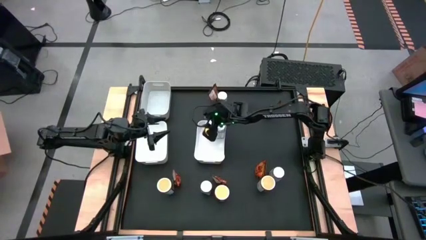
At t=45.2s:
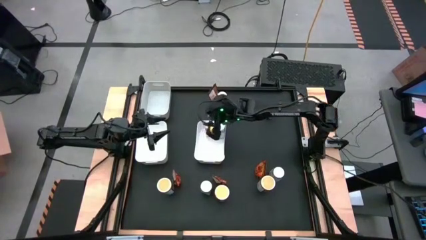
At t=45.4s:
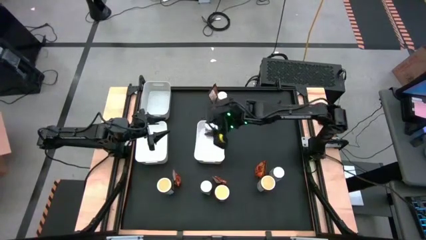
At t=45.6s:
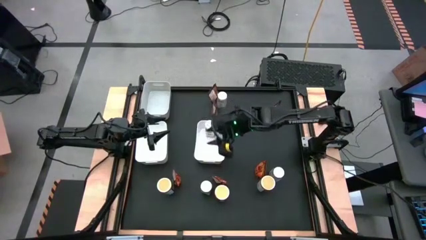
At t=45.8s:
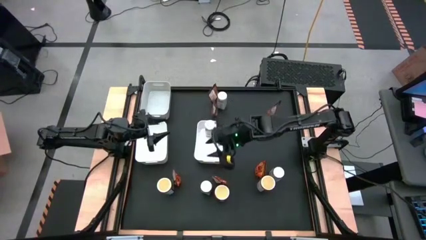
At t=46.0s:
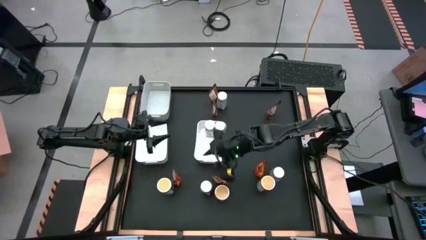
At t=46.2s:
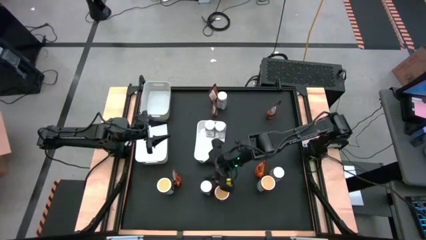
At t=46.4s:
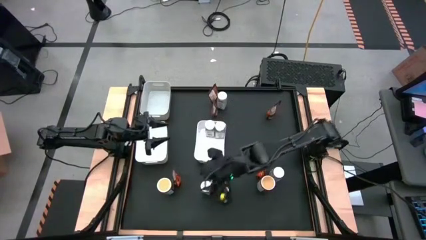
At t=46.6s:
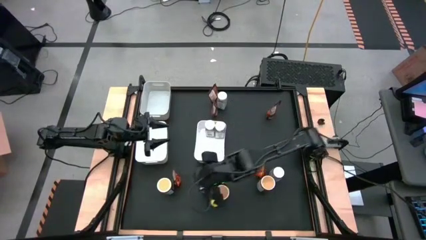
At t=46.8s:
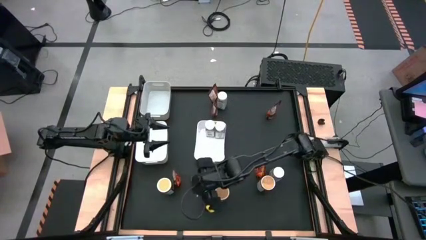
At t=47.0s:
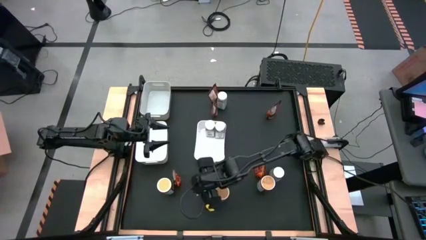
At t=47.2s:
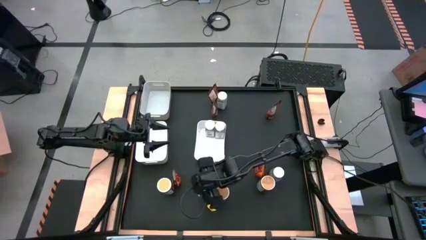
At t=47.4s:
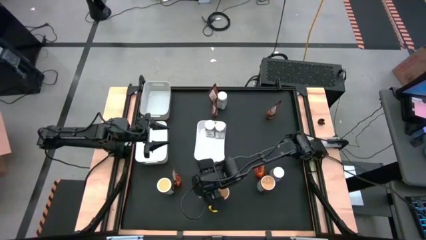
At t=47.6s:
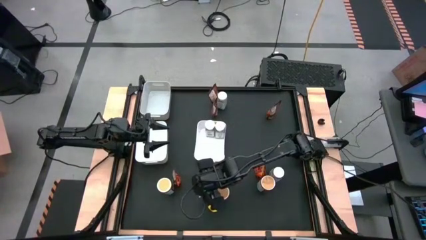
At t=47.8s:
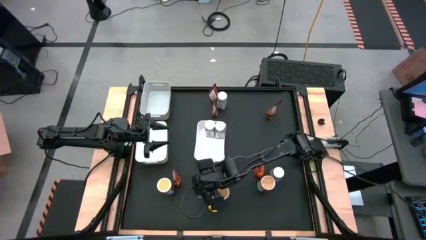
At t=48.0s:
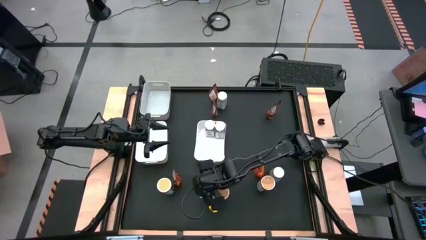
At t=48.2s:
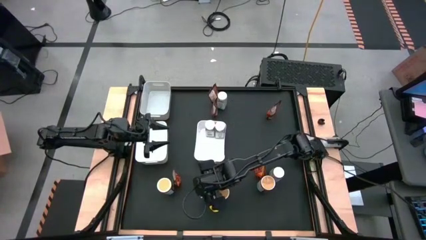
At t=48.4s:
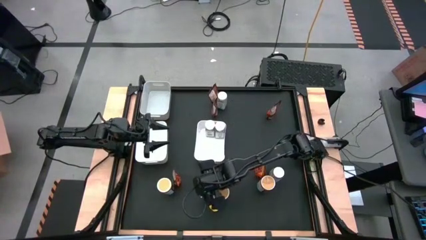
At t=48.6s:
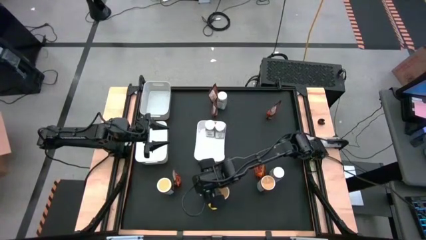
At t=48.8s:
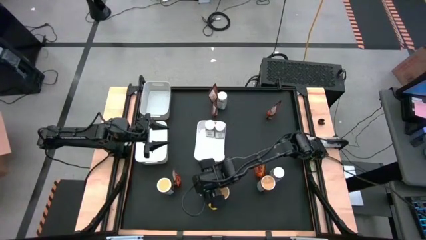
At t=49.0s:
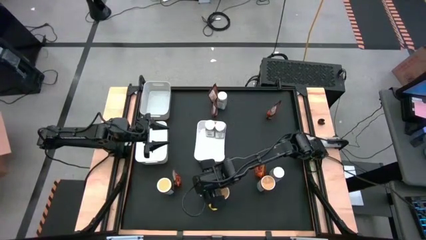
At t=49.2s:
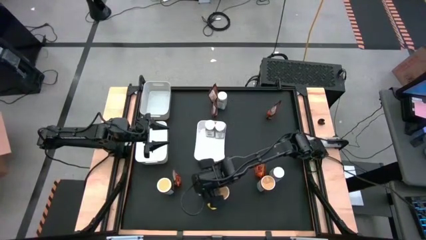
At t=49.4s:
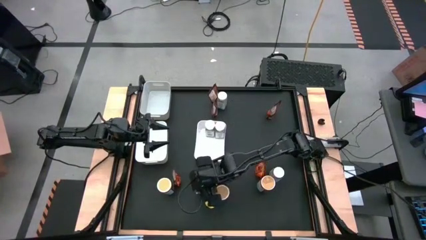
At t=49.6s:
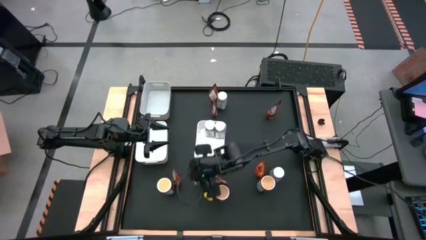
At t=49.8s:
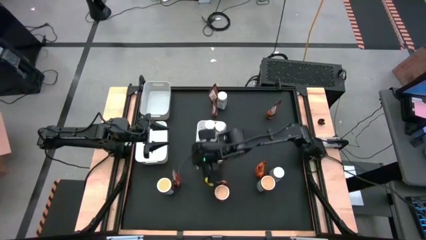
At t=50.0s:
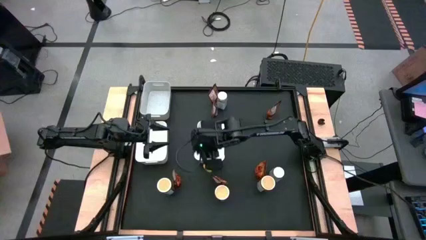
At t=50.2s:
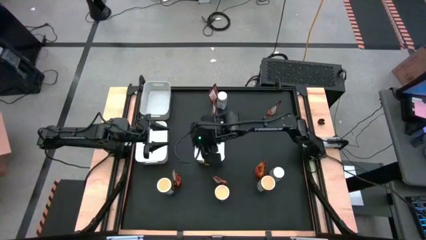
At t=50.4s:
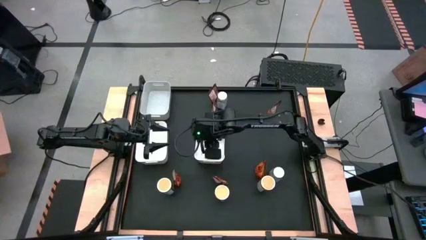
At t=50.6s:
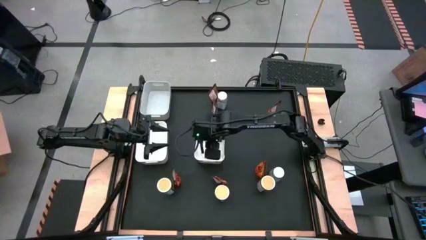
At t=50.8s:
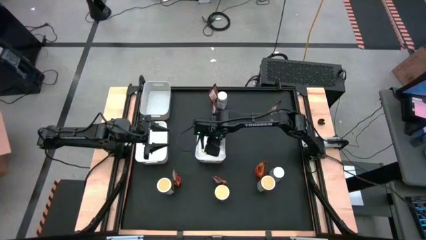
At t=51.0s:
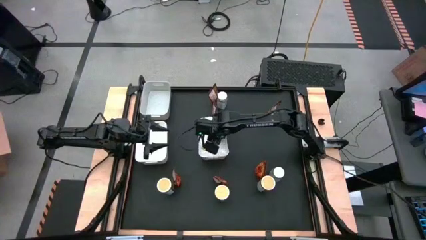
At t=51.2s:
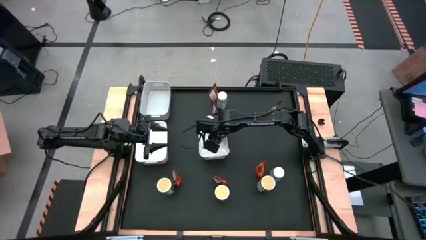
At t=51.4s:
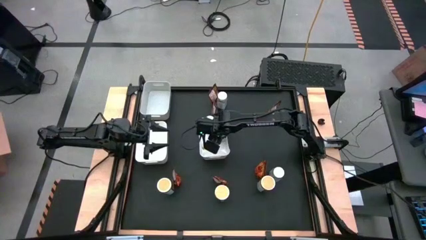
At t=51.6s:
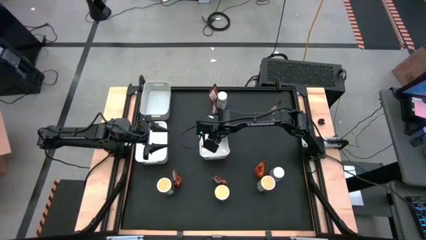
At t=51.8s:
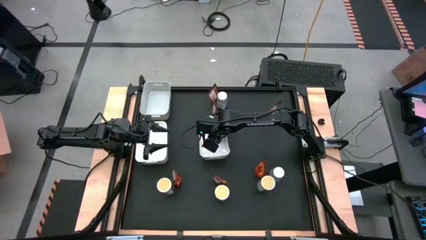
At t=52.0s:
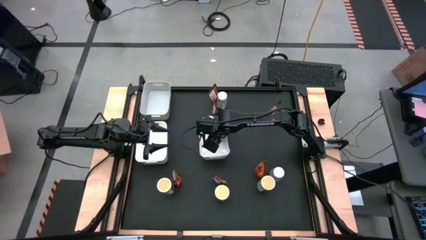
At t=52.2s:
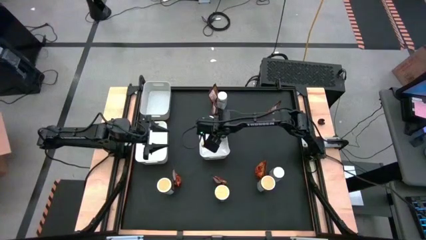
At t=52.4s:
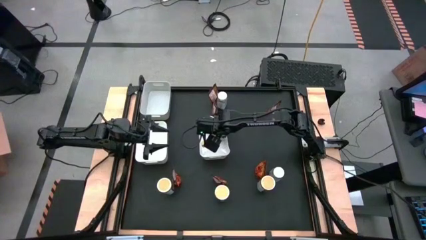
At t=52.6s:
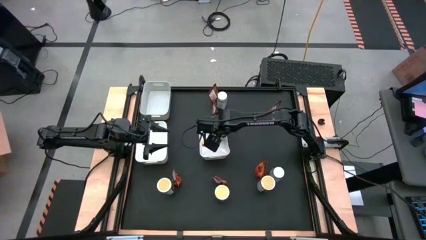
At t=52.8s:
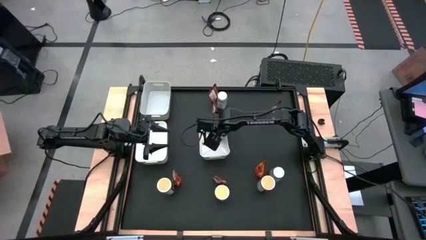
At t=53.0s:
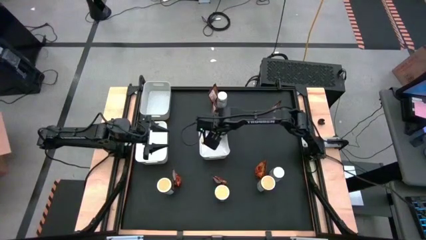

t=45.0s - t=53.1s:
Task: Sort spices by type
Put the white seasoning bottle into the right white bin

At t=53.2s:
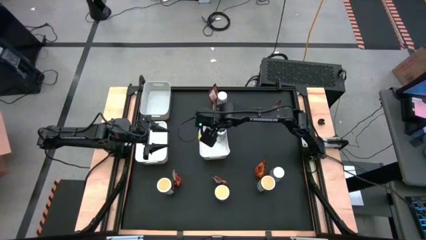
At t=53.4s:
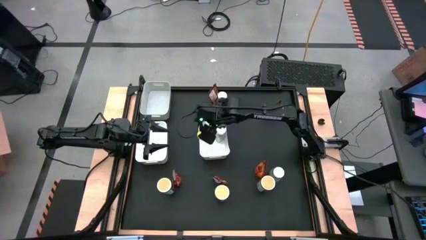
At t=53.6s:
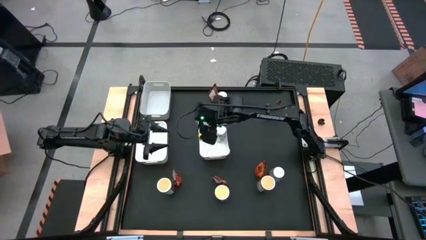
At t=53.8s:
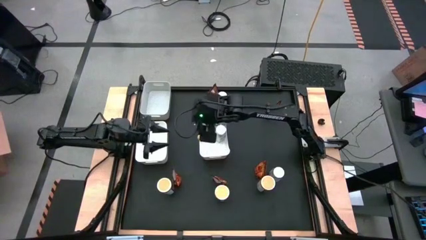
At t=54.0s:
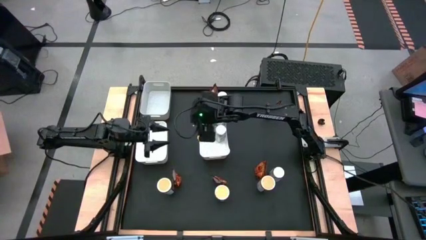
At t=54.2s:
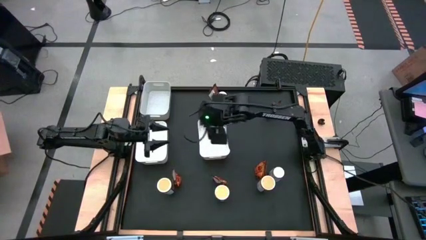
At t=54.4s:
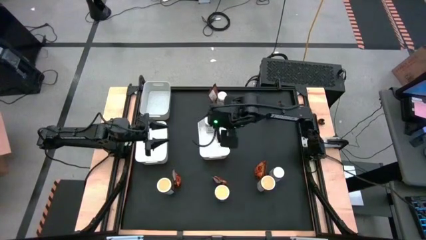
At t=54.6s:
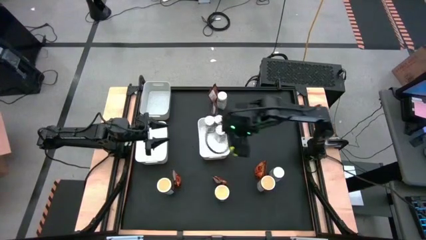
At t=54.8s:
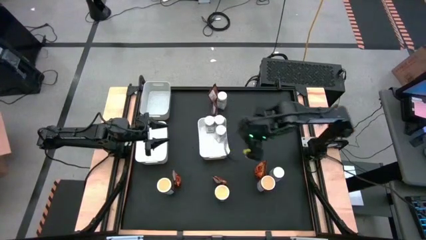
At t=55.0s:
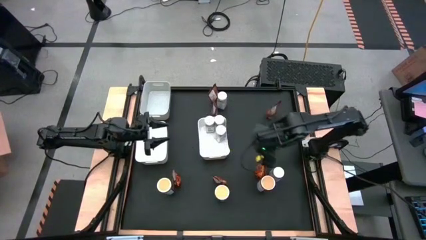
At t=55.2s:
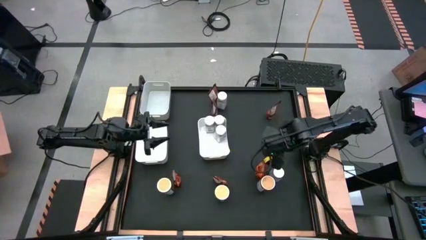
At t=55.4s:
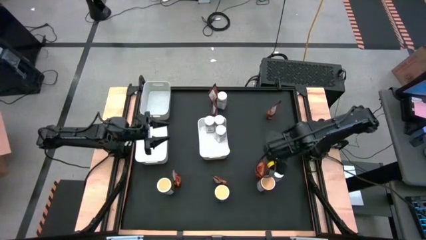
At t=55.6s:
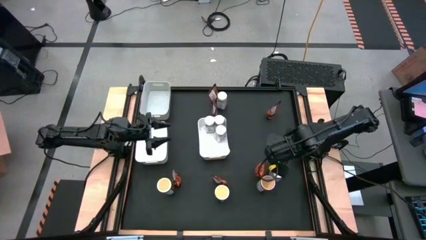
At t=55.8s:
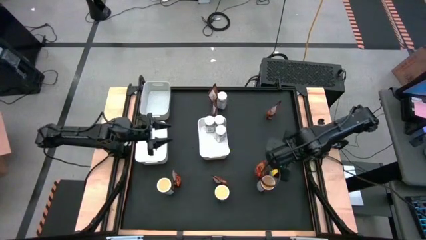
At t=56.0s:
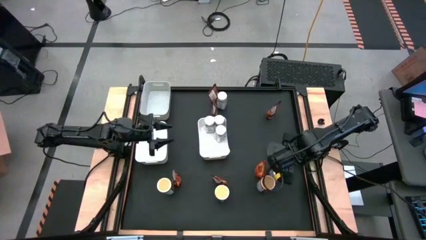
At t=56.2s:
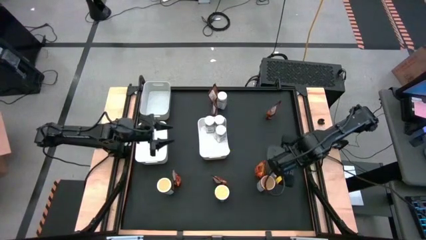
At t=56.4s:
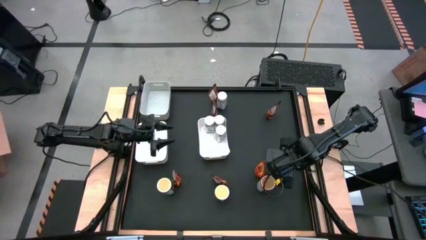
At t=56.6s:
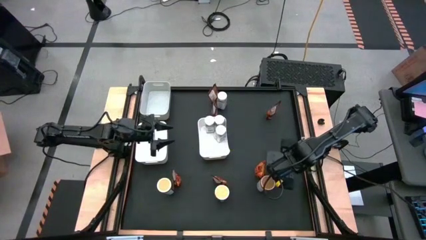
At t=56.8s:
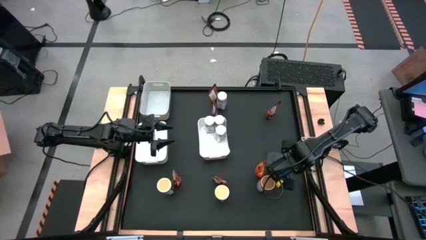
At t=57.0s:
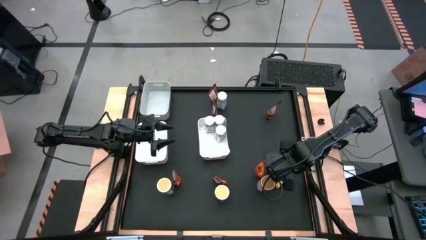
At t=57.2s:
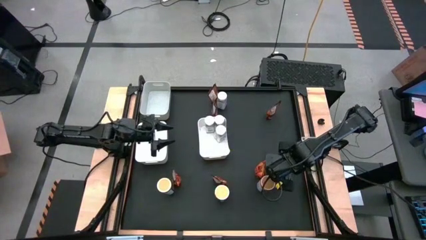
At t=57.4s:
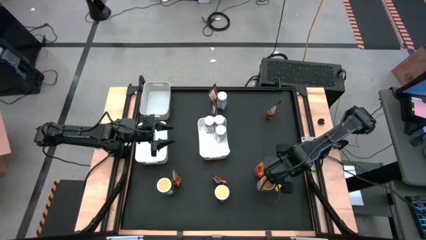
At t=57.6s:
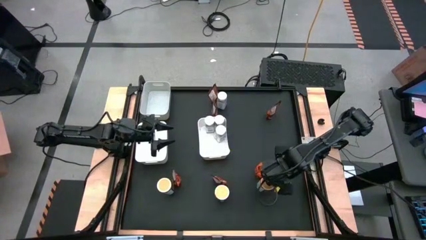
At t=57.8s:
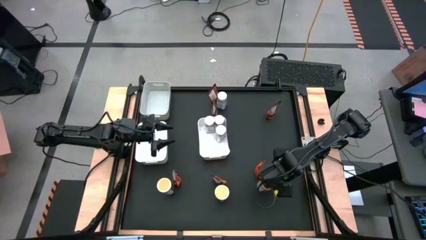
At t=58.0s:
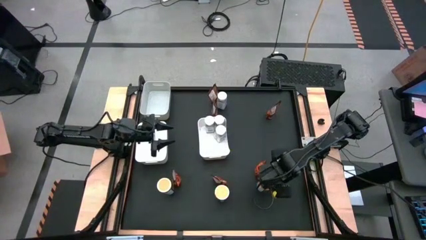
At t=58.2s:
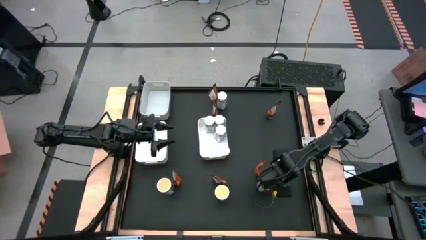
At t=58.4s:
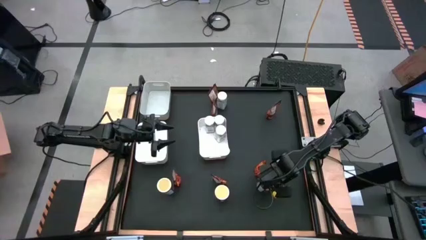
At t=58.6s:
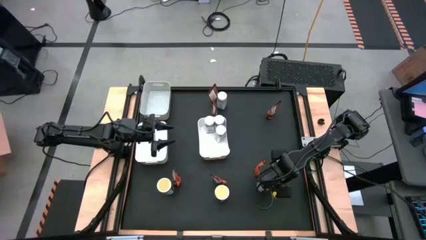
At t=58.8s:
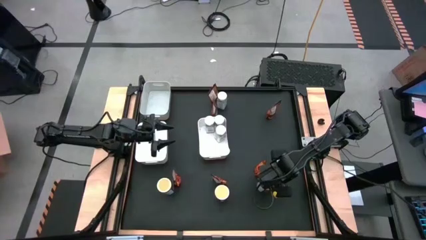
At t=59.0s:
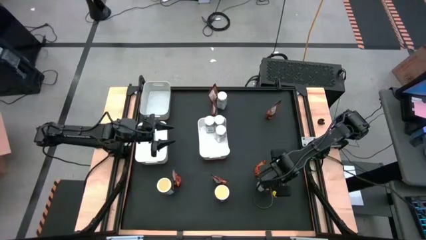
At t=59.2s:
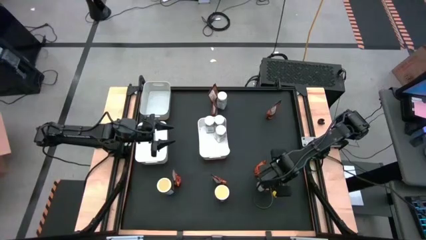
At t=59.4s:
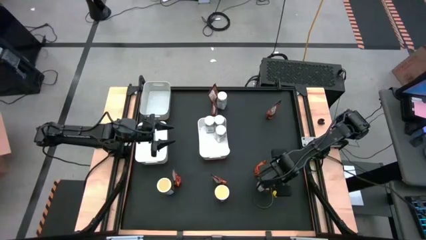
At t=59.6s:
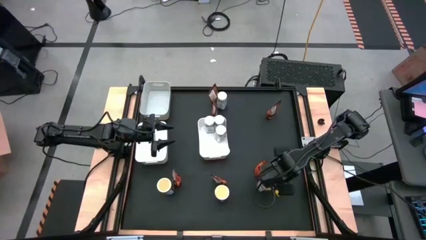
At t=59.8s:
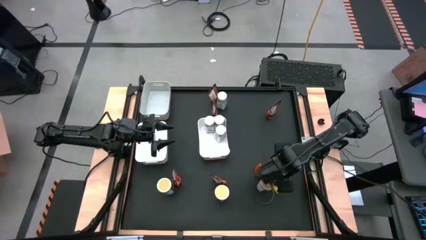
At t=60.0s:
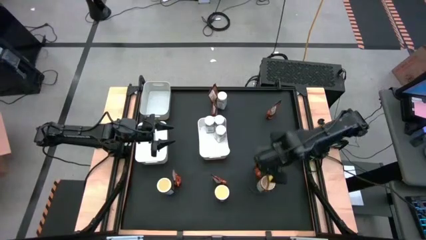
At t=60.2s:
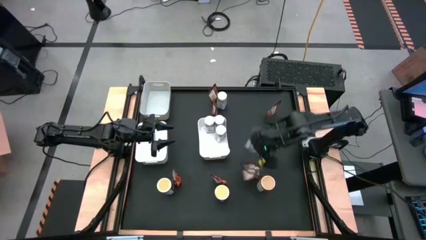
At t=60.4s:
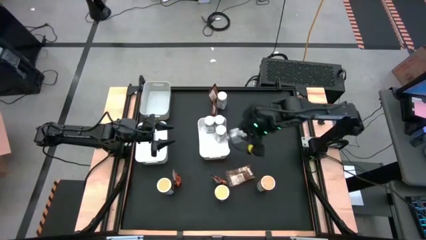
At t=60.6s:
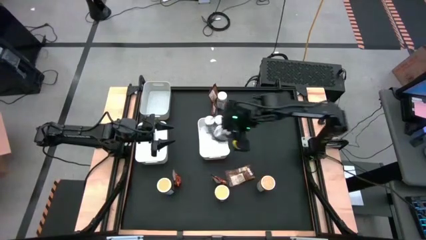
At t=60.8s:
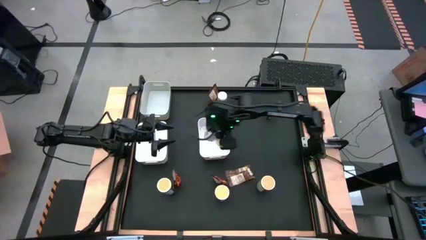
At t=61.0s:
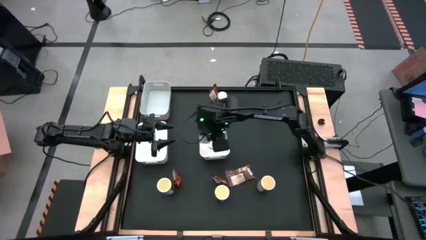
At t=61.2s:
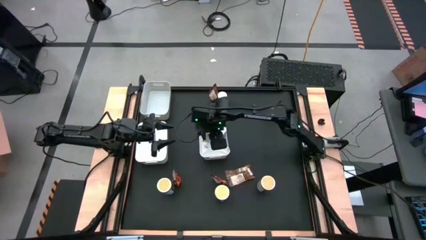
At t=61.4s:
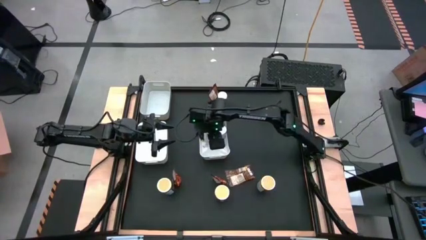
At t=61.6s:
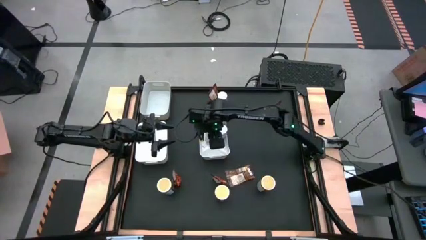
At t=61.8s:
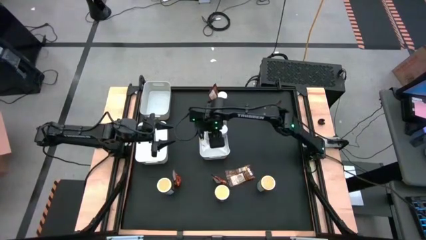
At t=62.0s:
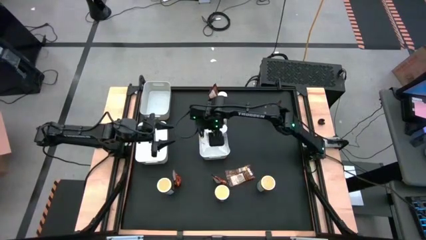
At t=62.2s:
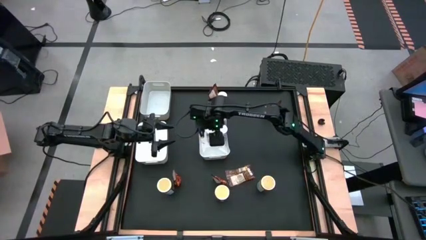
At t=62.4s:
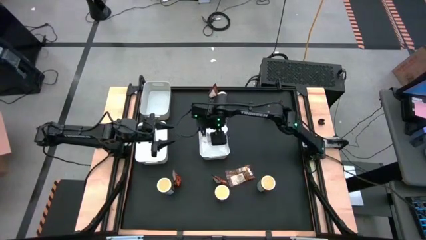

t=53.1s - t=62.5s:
Put the white seasoning bottle into the right white bin
